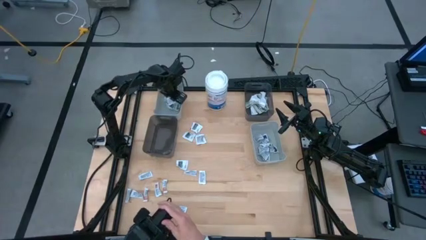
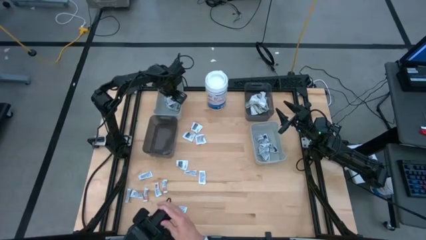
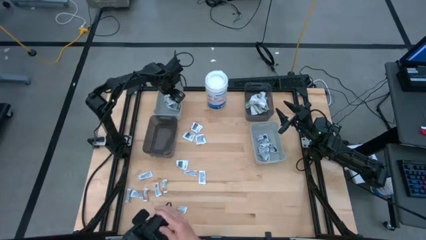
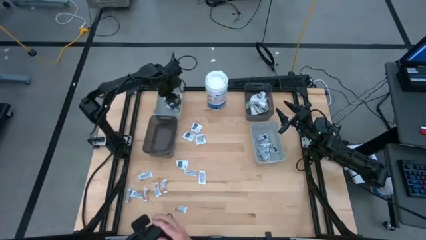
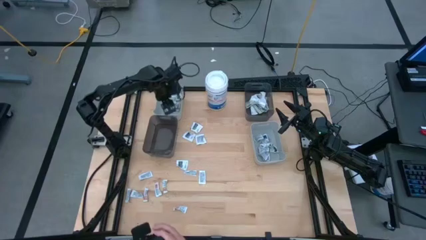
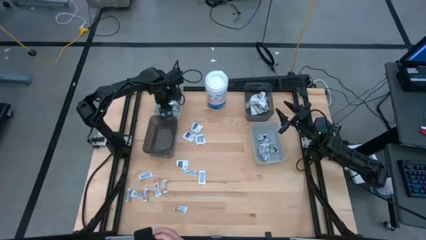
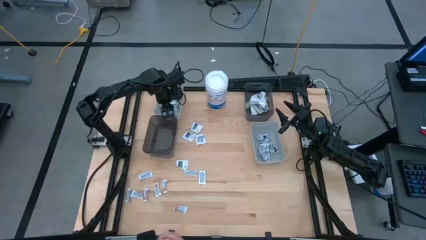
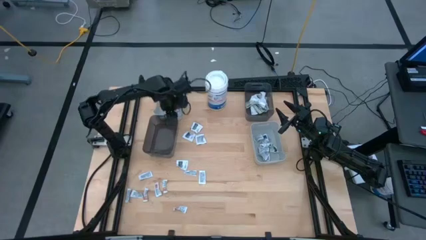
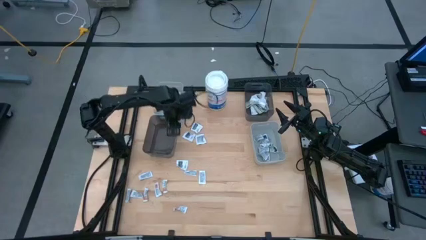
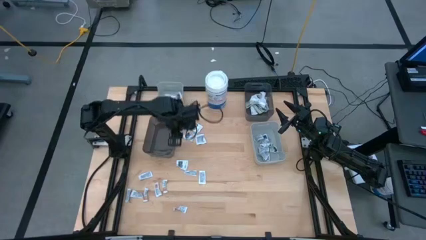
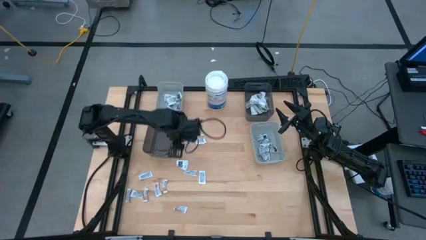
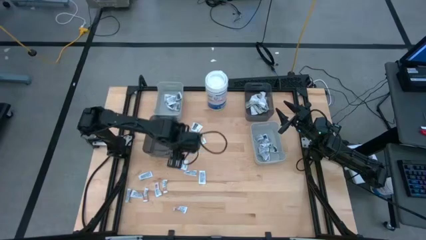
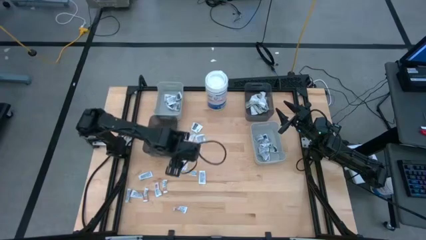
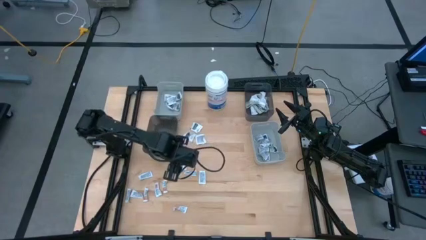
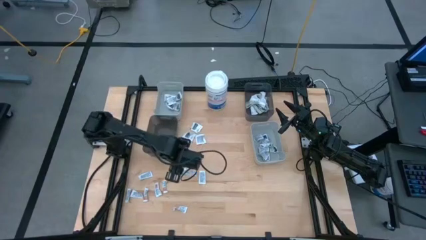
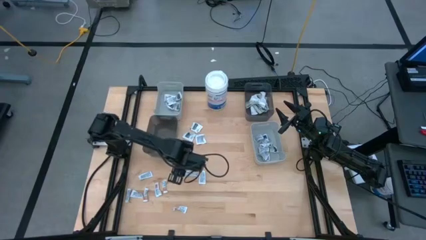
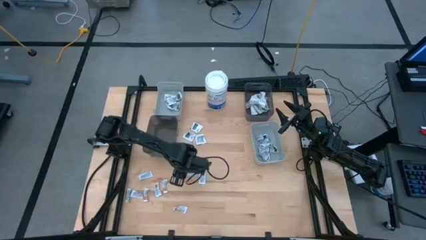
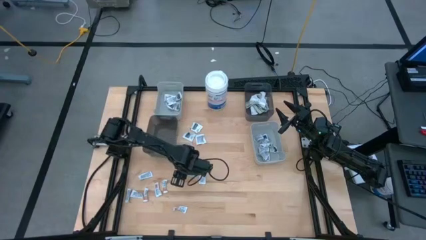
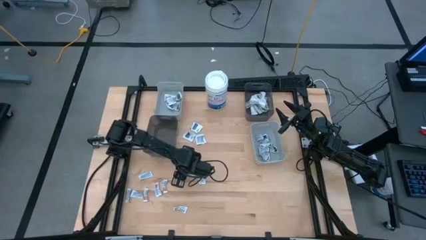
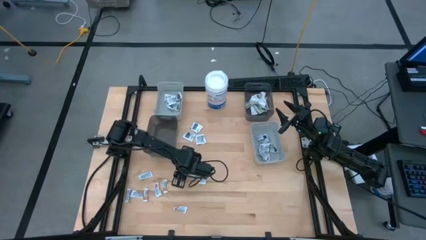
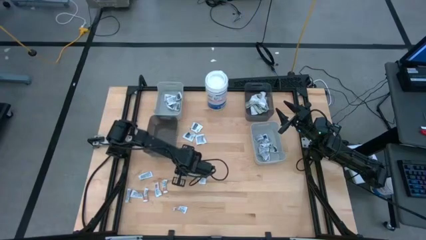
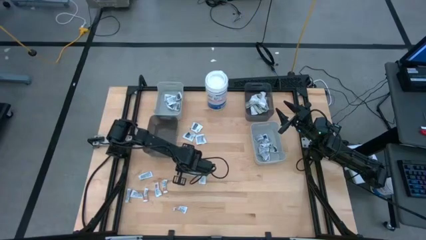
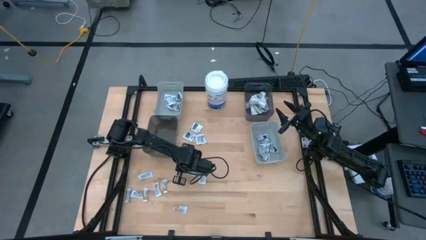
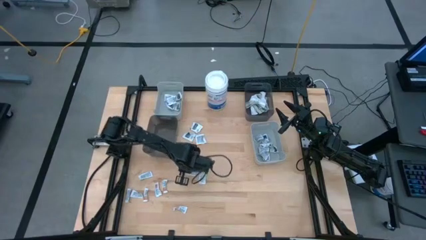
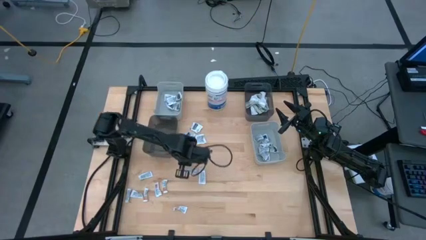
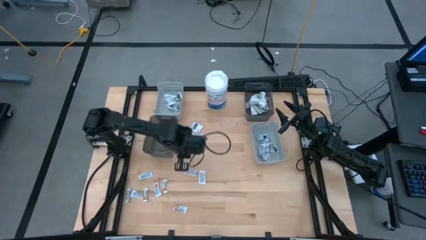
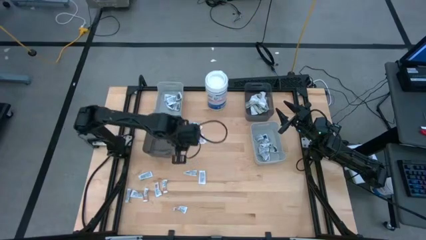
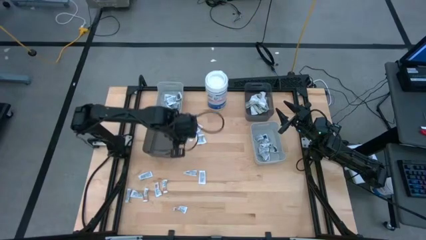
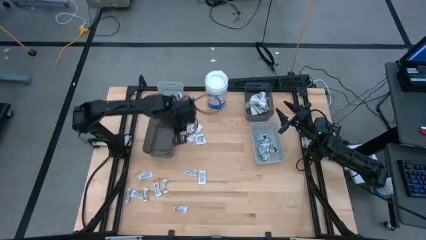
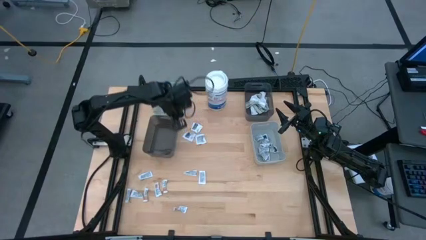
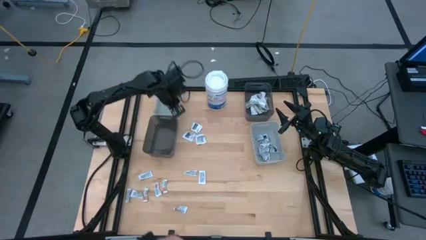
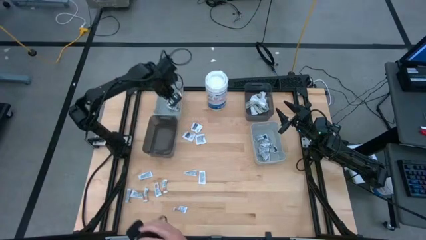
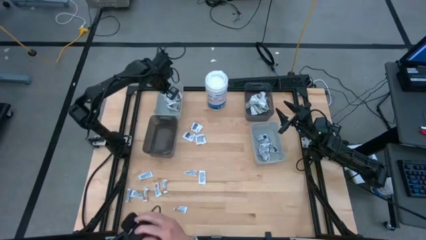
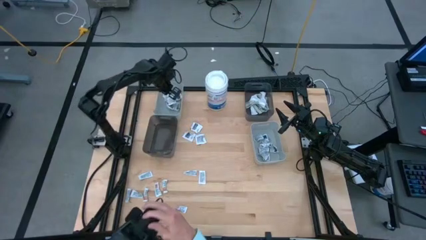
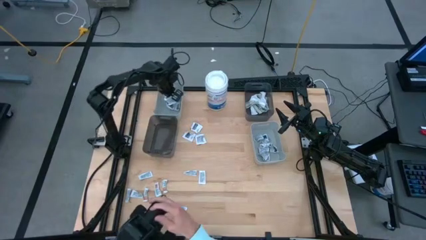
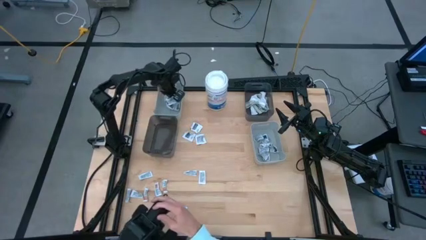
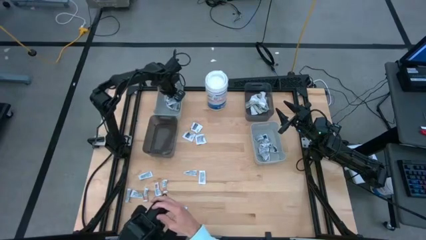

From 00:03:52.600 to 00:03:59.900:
Task: Pick & Place First Aid Supplies
Put the gray towelette pack into the left gray bin

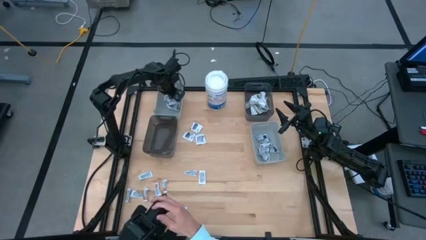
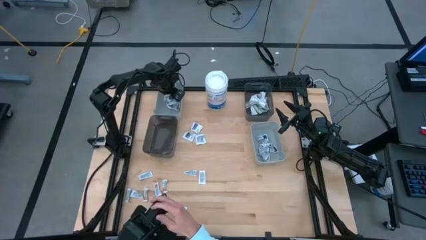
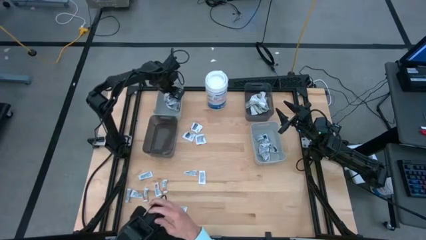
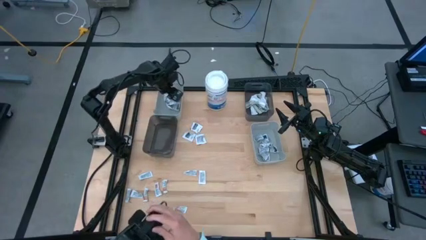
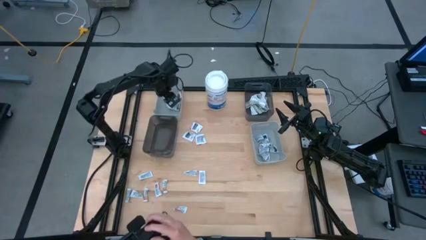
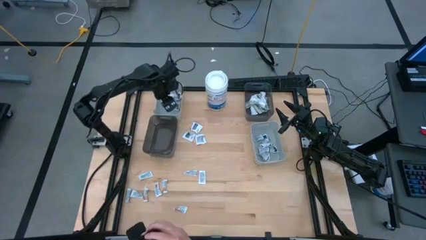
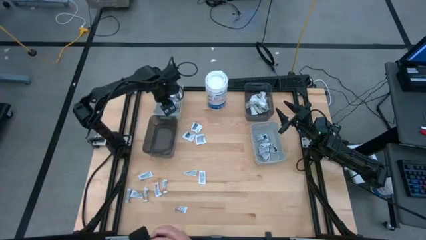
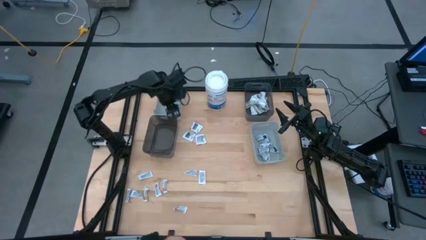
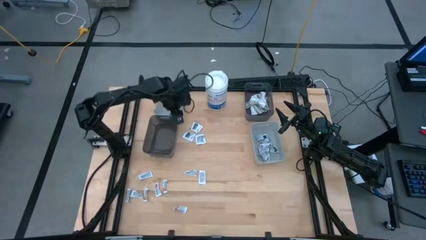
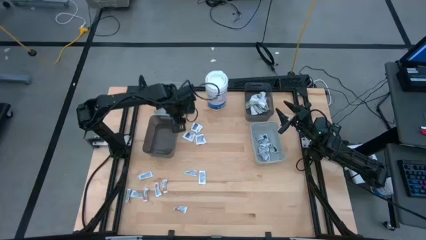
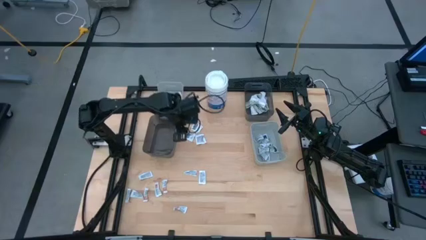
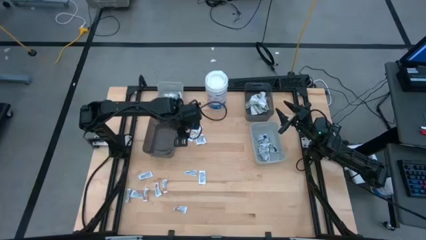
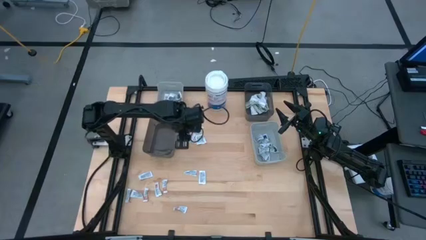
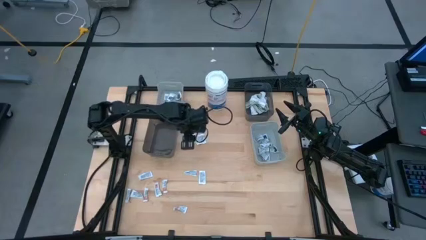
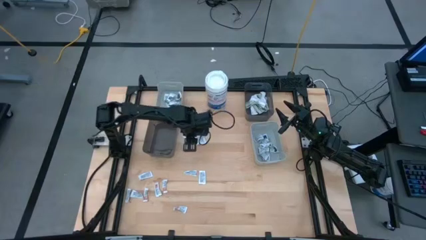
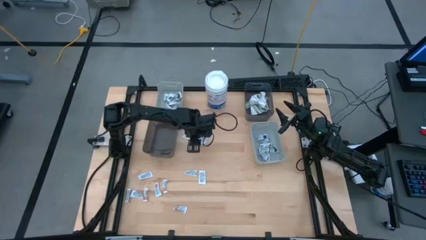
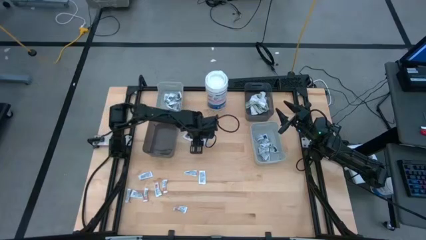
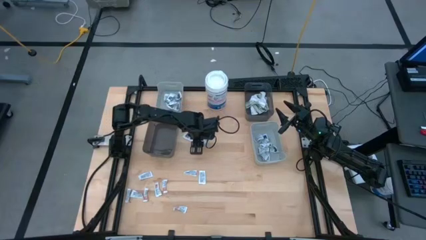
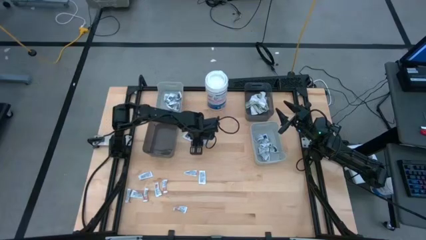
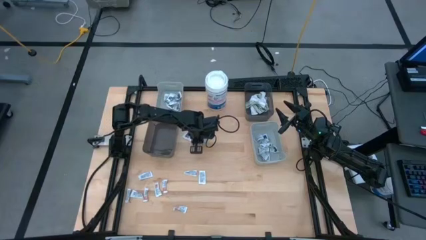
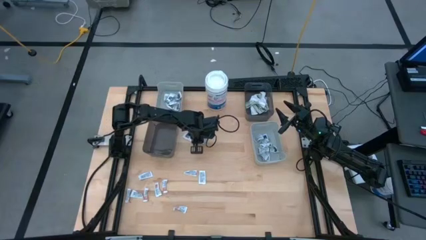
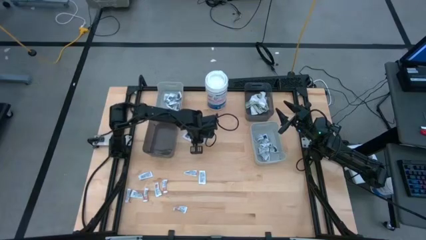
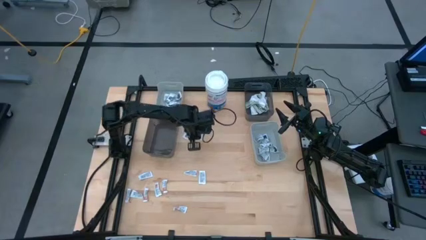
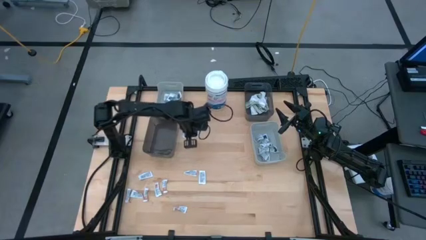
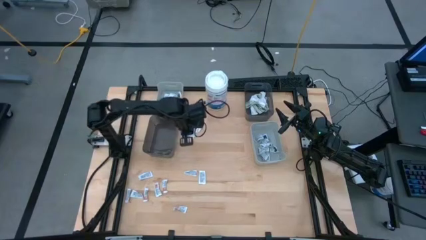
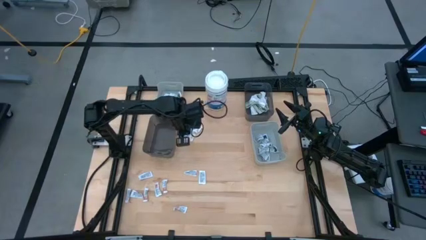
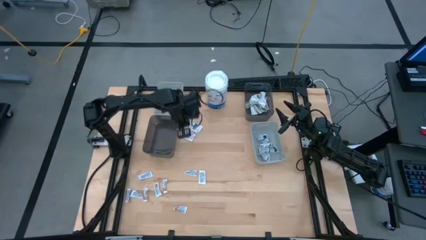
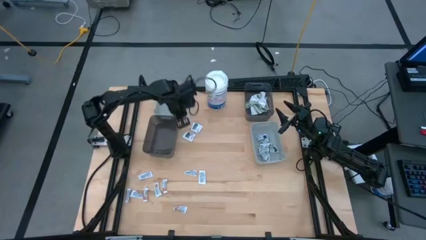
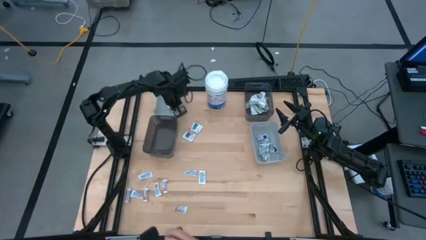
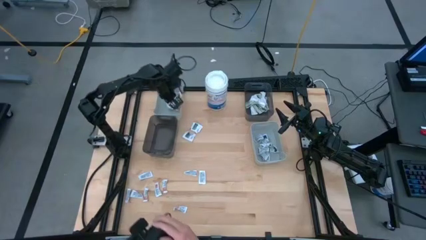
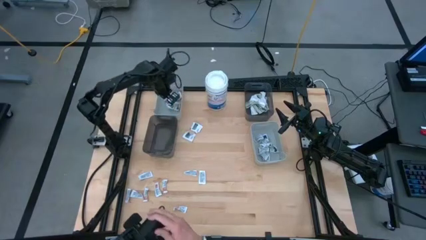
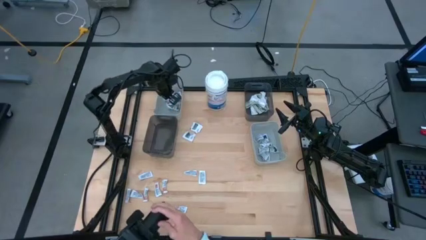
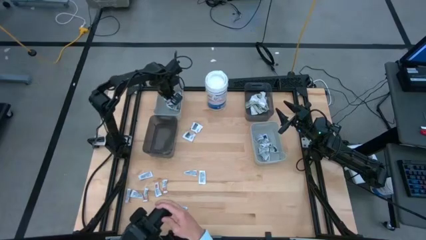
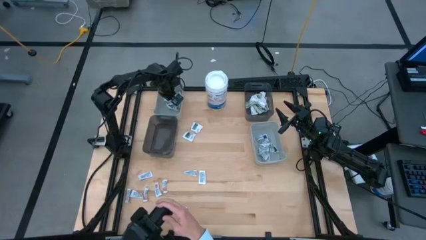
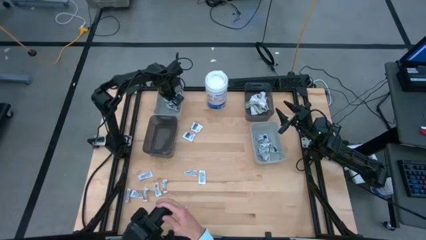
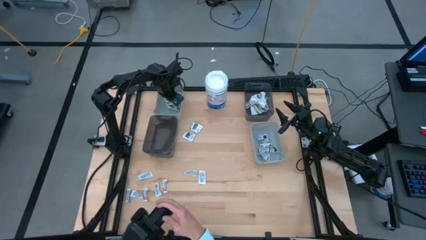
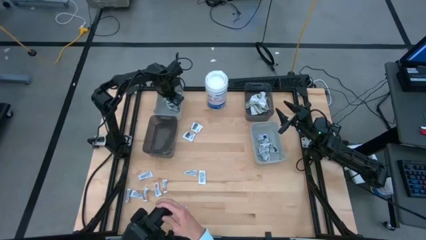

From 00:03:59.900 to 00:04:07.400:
Put the gray towelette pack into the left gray bin
